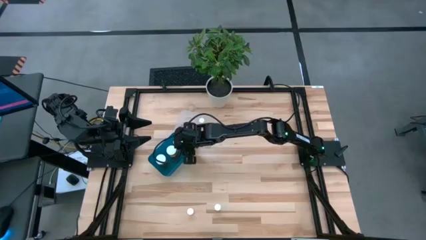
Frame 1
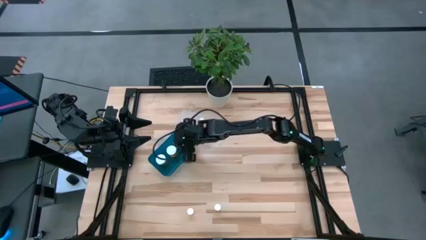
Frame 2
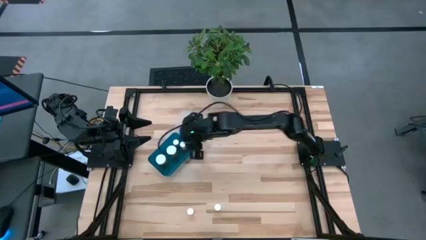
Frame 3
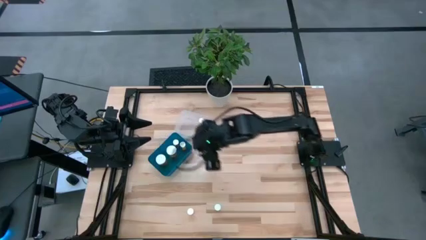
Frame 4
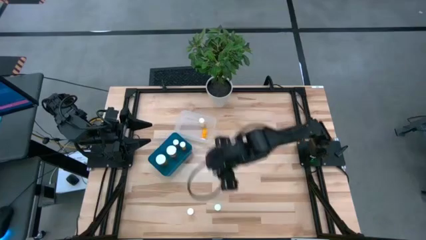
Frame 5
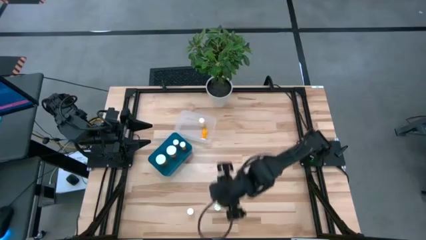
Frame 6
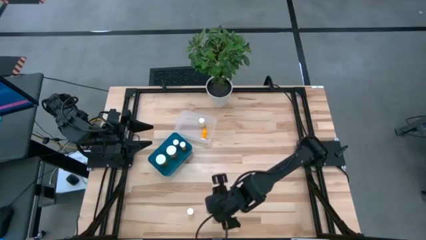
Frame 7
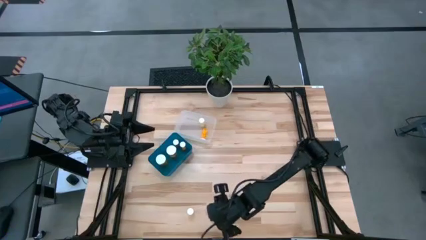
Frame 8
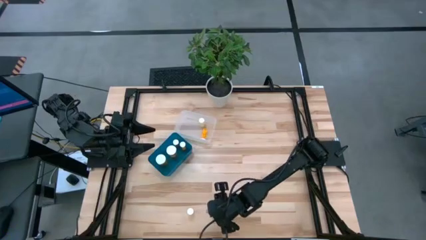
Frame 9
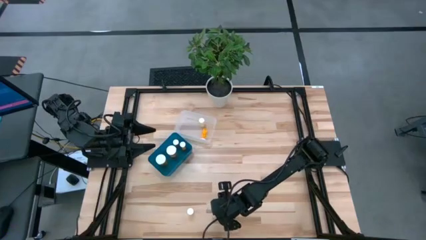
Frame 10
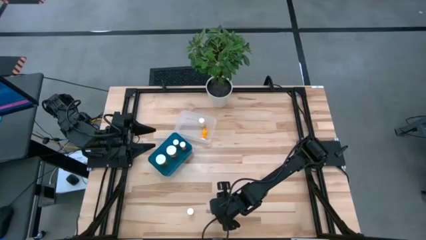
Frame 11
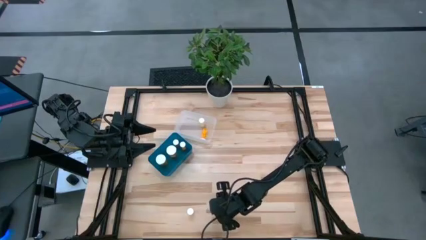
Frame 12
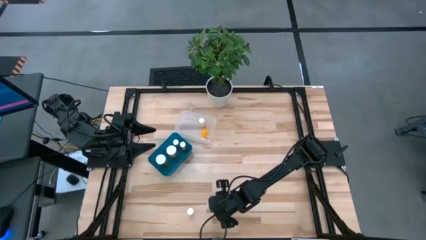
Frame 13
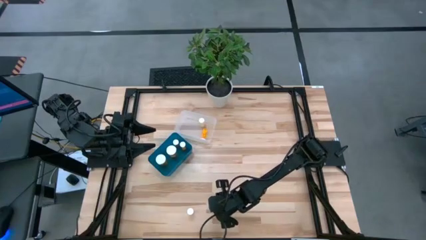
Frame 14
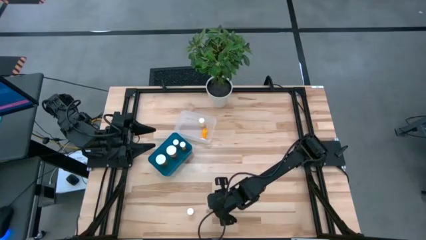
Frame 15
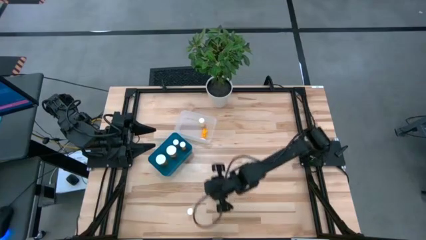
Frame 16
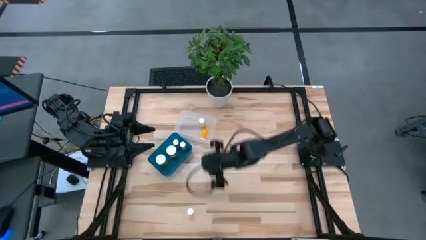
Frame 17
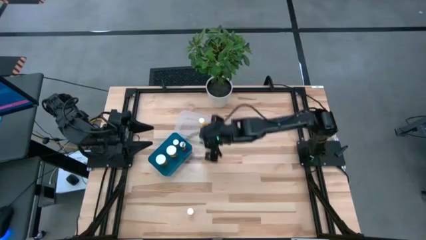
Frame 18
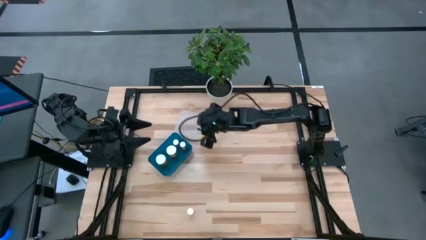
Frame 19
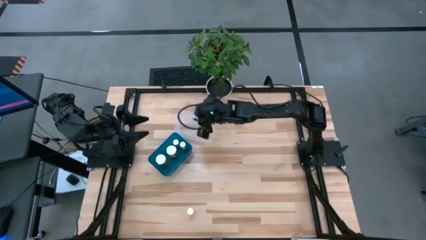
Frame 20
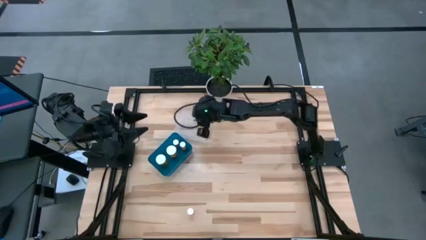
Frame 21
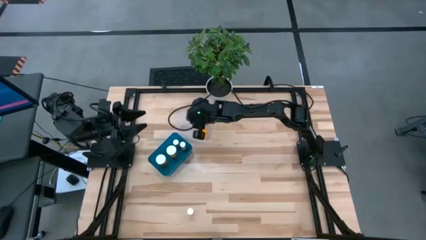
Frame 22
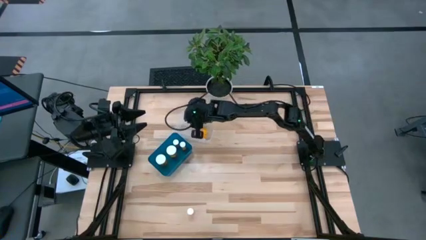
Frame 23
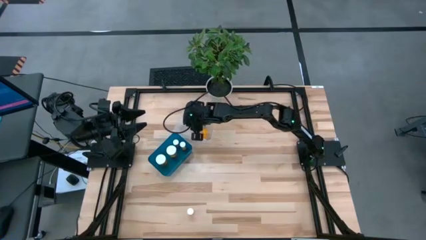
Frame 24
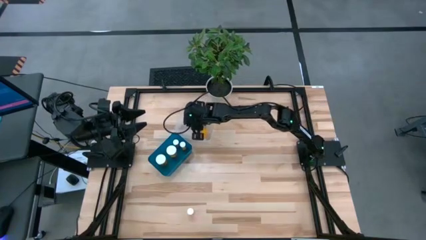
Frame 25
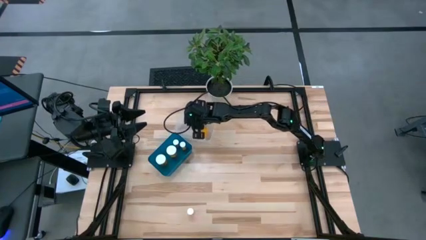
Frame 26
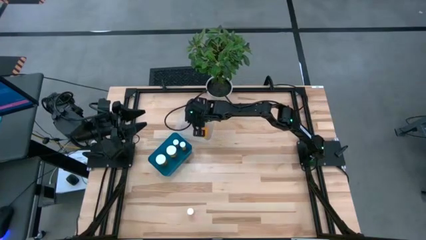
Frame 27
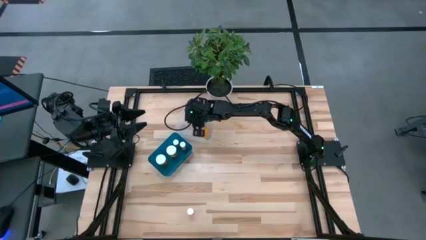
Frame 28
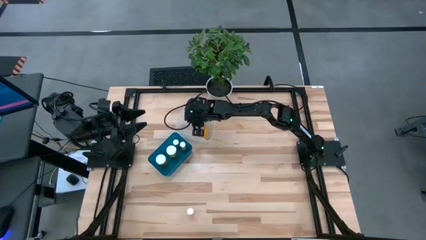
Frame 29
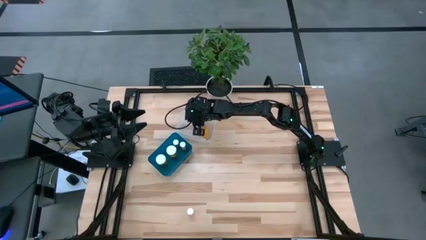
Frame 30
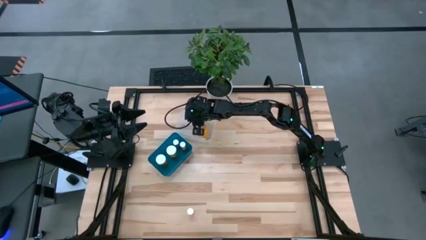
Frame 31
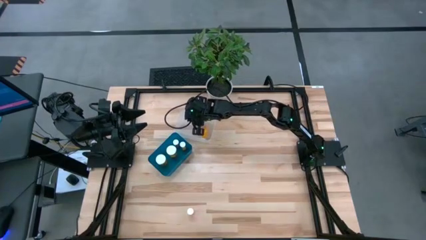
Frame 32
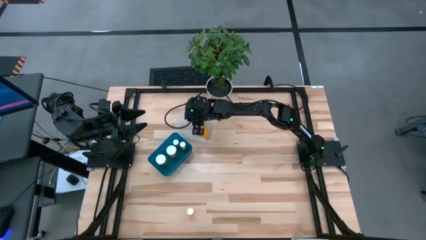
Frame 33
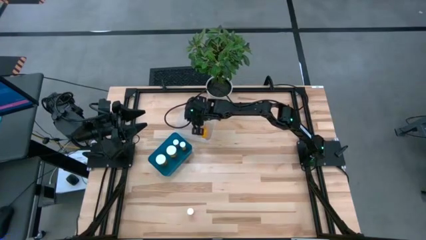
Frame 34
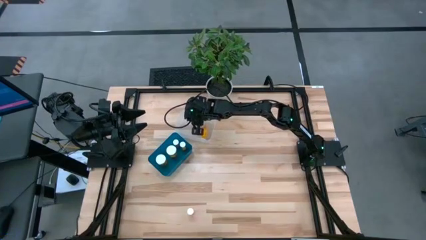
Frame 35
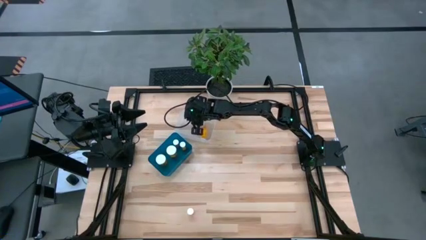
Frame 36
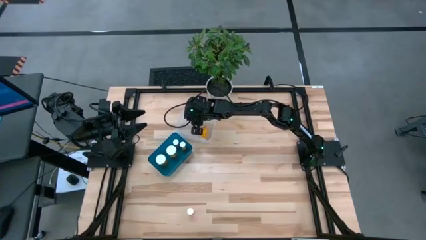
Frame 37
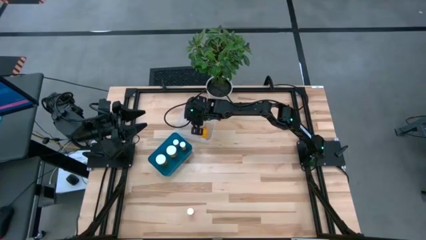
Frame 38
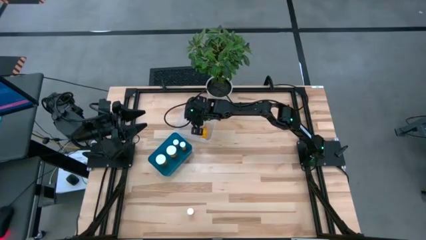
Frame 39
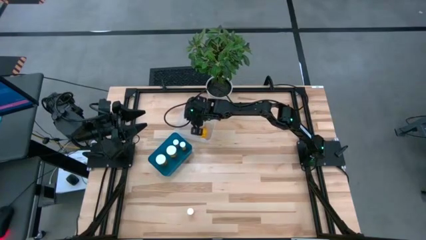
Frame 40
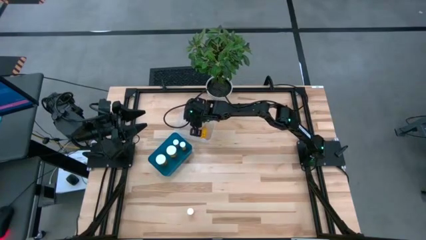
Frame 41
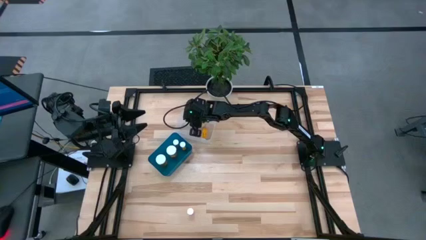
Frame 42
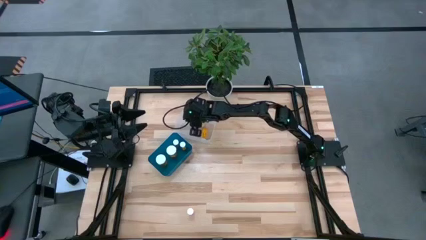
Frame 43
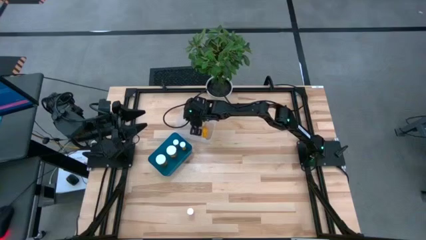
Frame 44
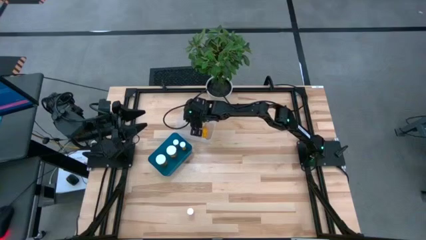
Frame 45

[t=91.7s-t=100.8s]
Task: Pick and place medicine bottles into bin by pill shape (circle, oval)
Put the green pill bottle into the transparent bin

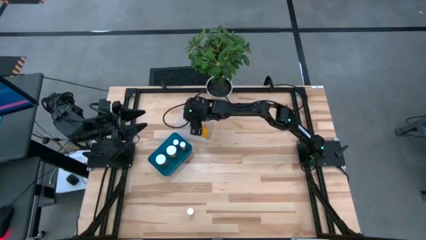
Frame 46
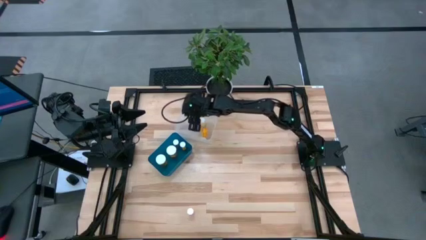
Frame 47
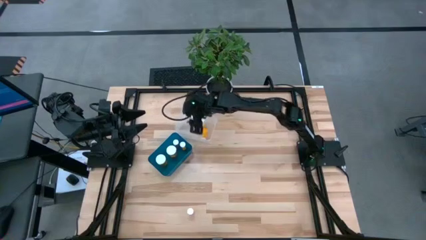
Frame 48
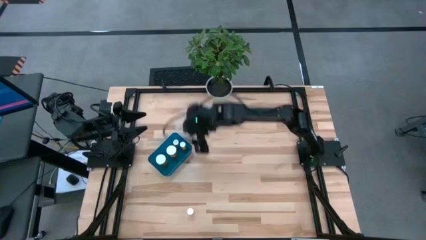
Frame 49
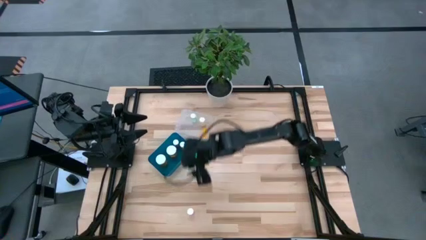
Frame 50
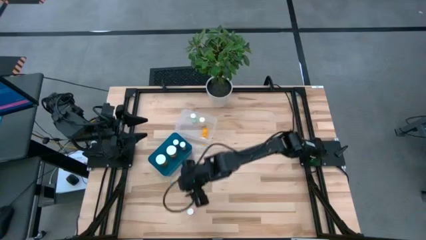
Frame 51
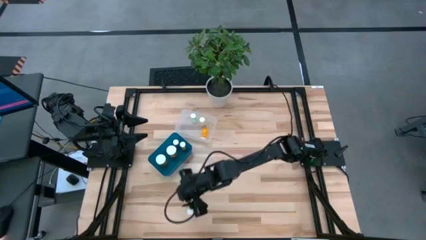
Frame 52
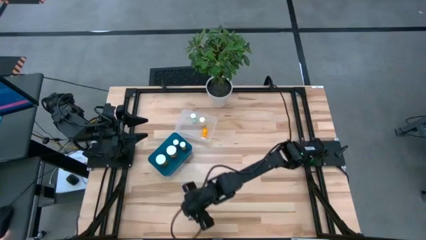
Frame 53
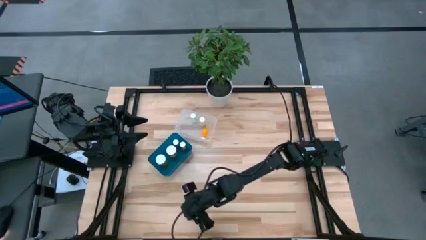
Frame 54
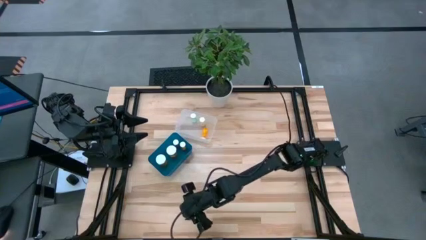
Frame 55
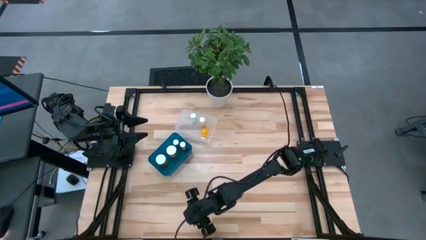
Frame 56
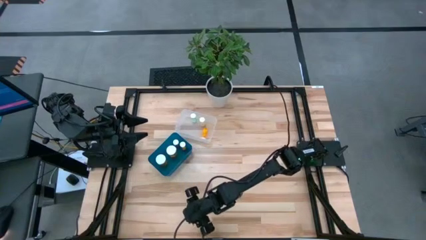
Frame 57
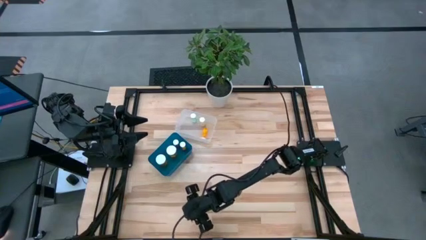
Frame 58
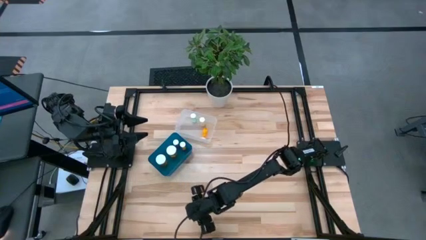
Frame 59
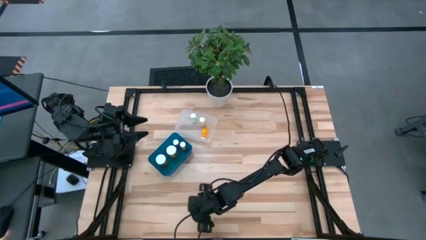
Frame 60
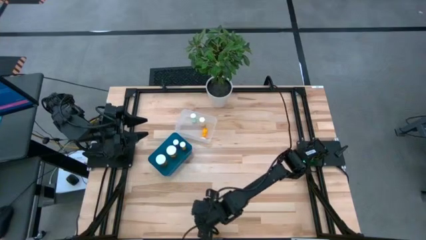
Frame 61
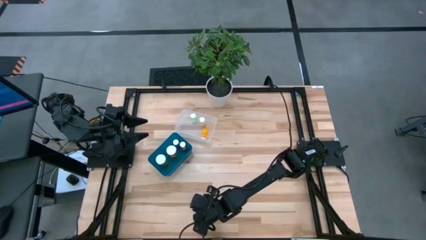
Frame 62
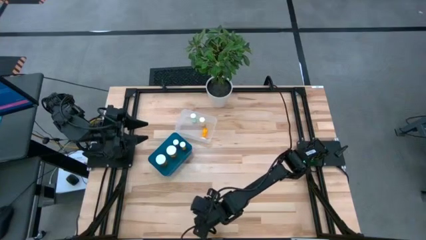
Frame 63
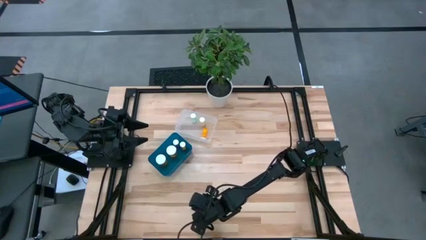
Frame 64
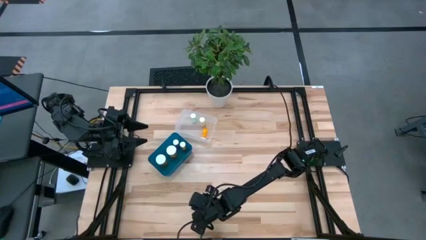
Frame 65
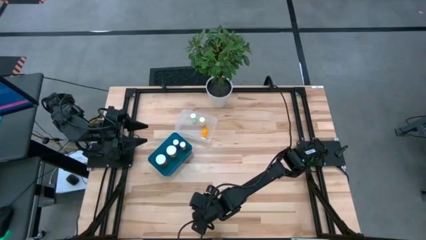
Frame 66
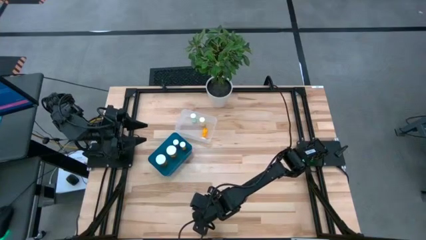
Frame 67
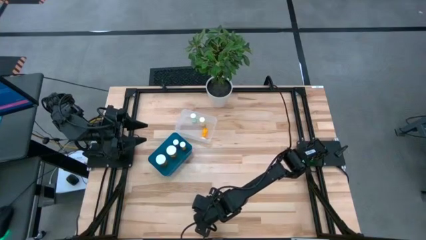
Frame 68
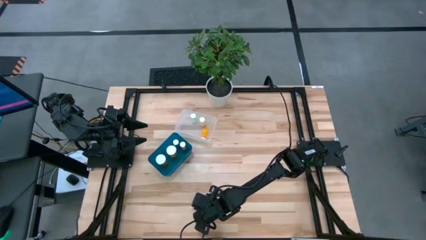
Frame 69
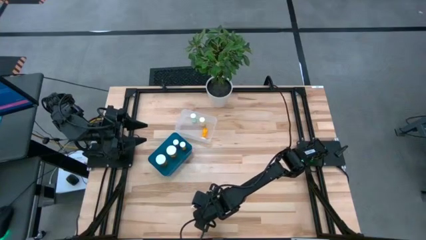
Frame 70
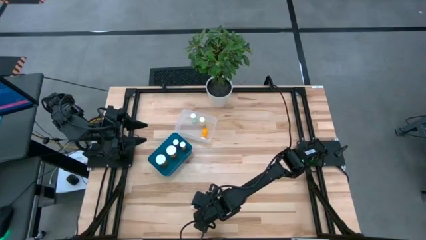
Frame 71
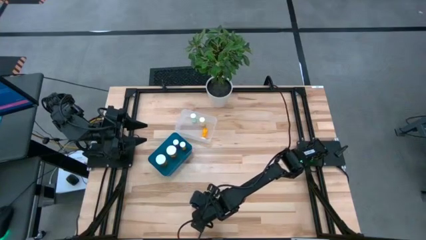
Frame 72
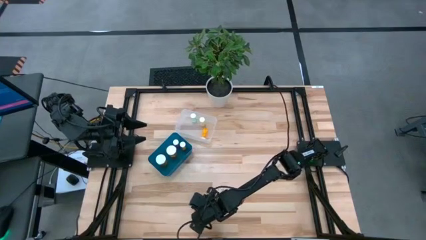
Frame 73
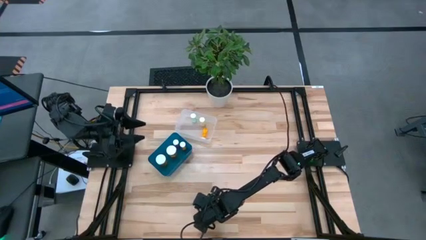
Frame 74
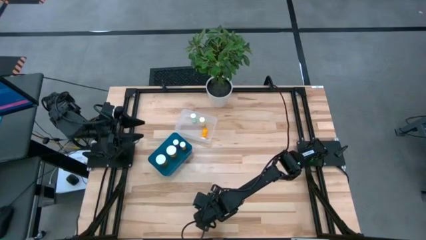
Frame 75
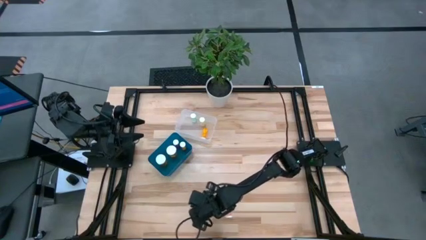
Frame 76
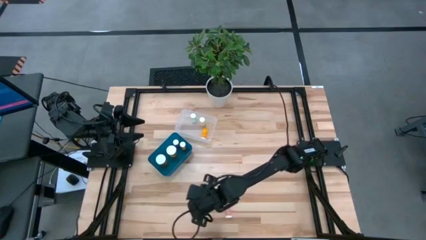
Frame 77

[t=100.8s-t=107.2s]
Put the pink pill bottle into the transparent bin

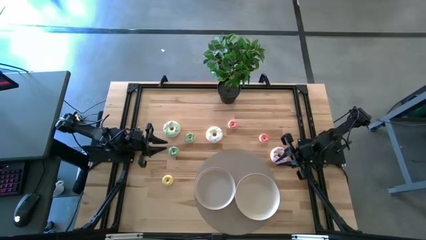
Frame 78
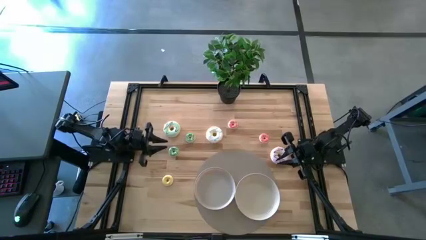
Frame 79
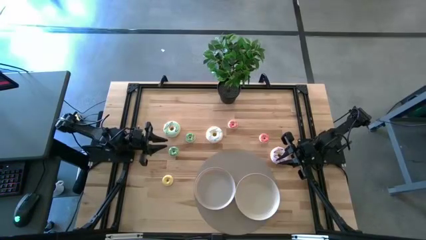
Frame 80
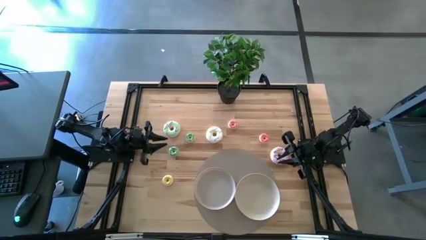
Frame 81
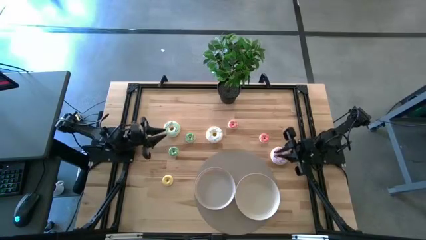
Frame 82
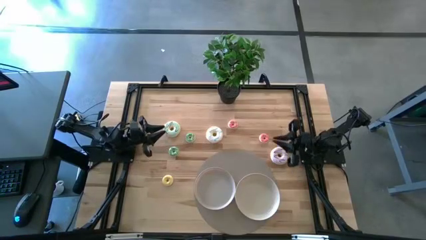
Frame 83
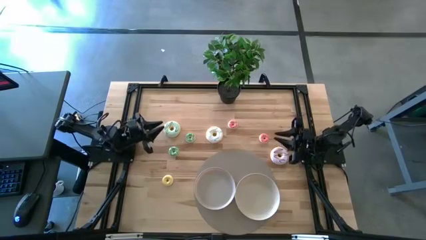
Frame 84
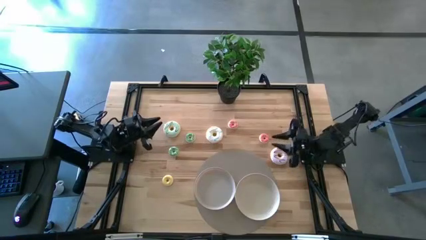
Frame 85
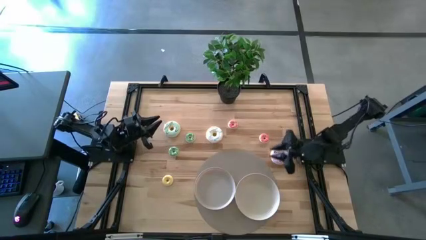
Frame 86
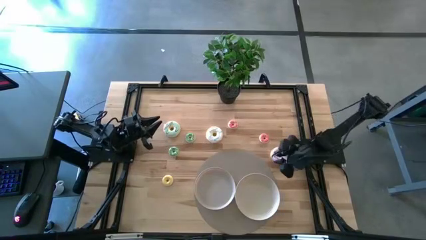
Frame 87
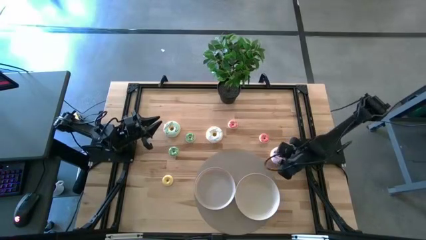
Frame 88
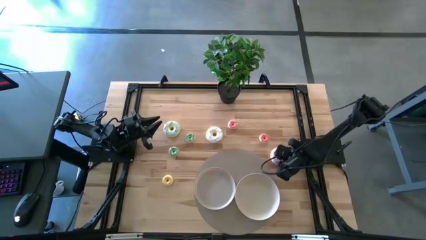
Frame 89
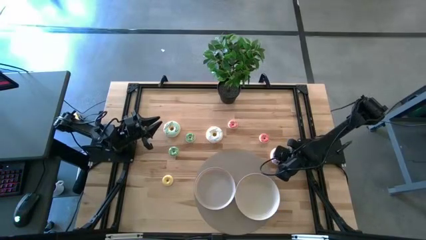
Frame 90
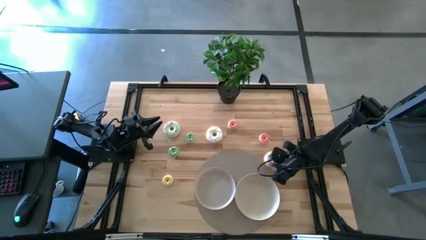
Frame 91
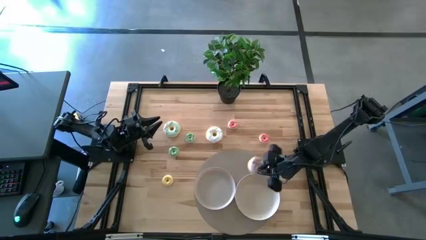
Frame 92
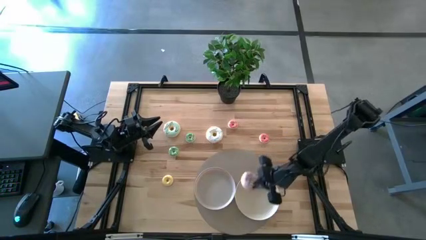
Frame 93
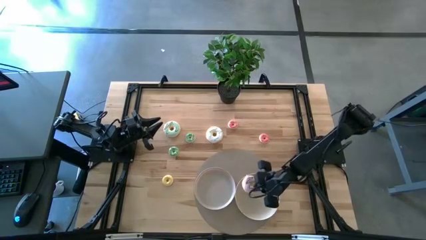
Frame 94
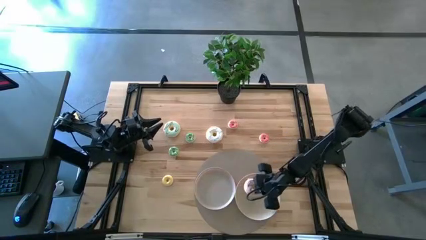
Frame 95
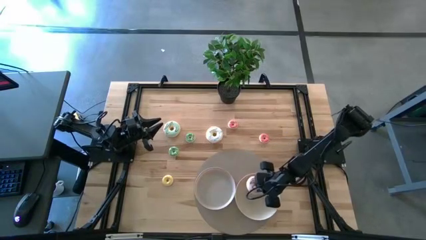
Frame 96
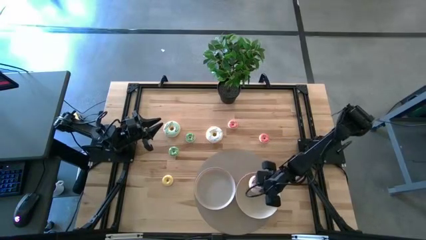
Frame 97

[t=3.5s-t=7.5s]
Task: Pick & Place donuts
Put the big purple donut into the right grey plate
